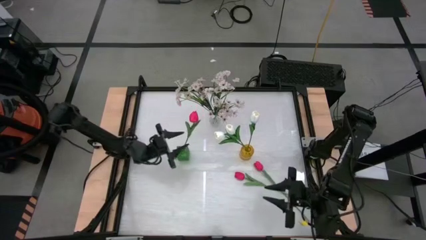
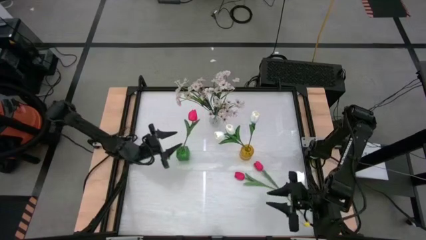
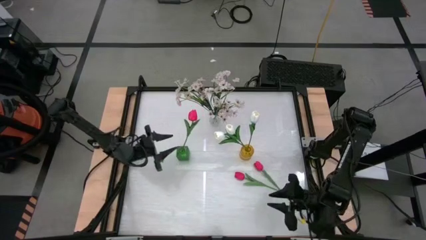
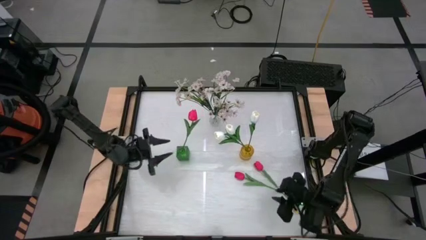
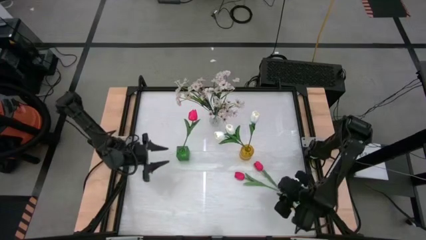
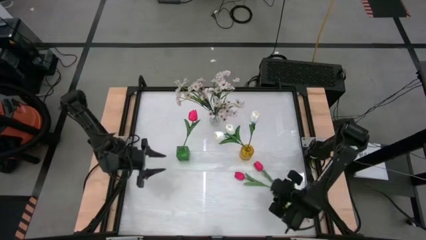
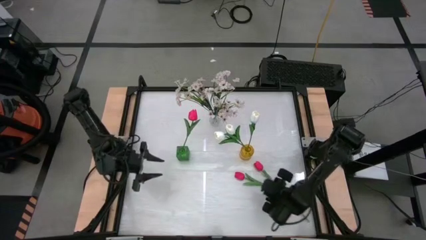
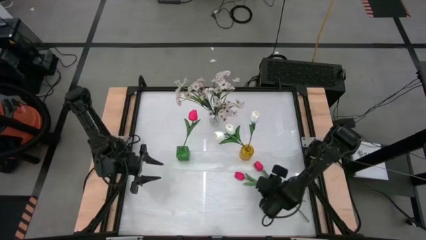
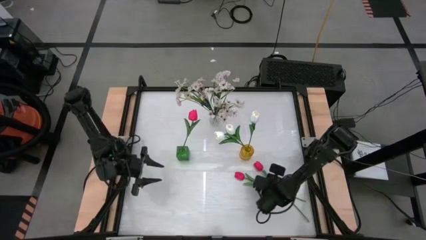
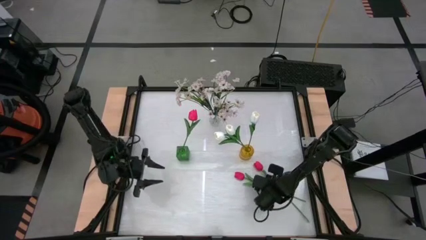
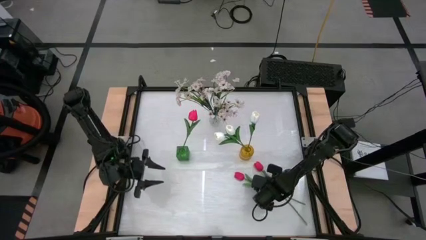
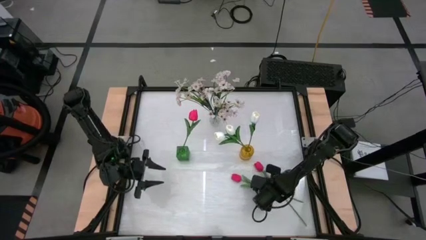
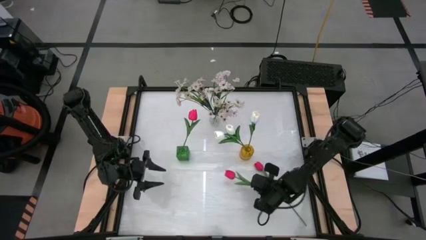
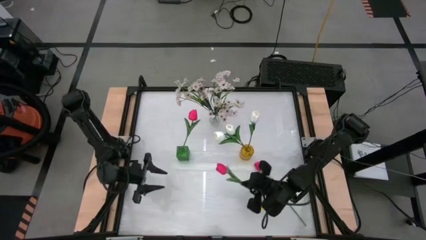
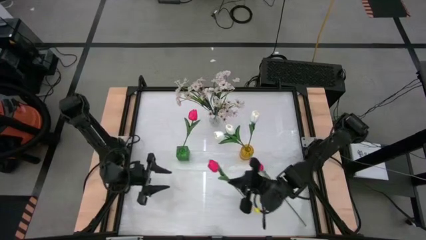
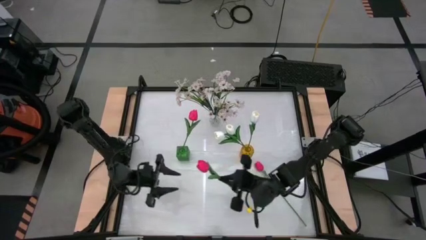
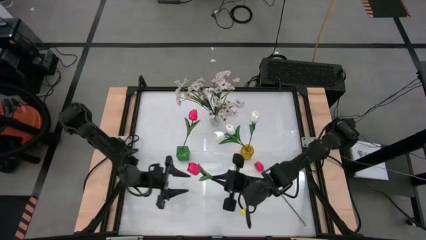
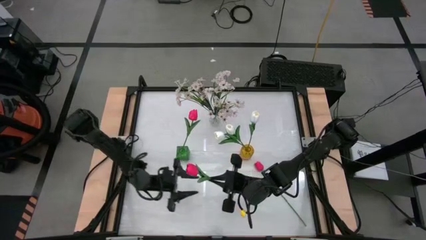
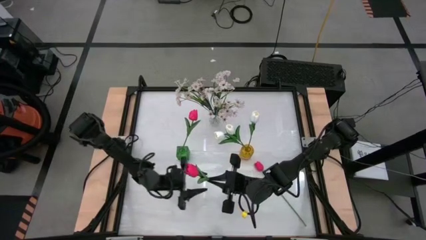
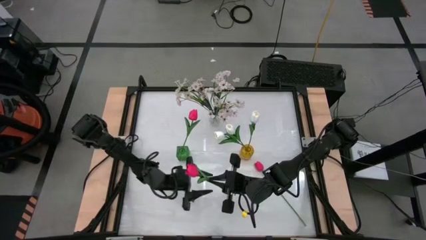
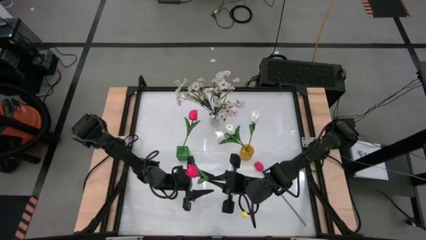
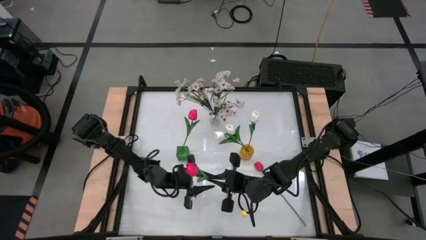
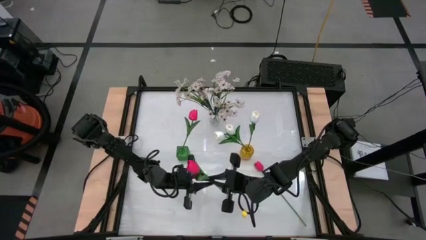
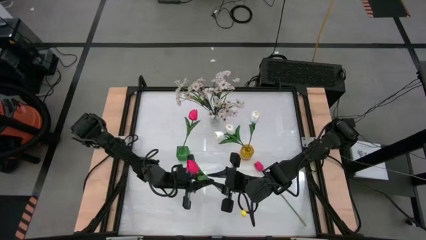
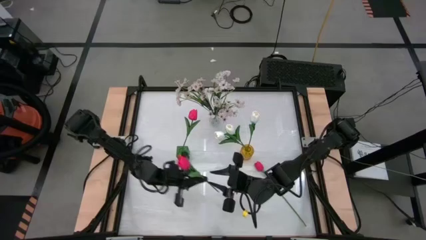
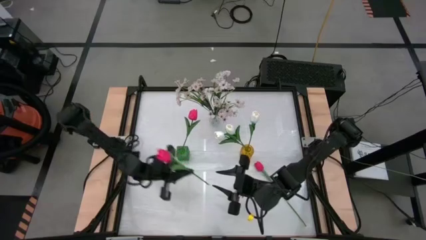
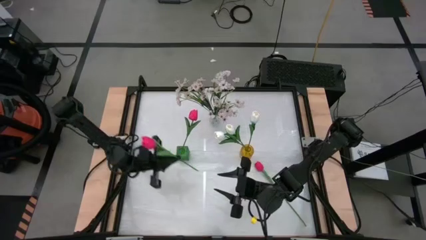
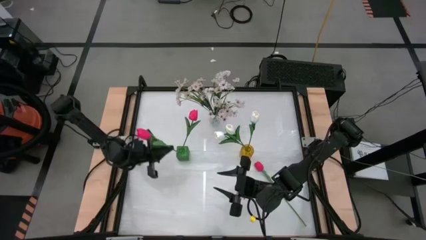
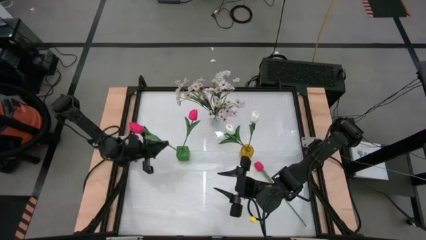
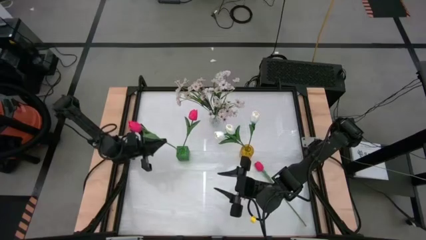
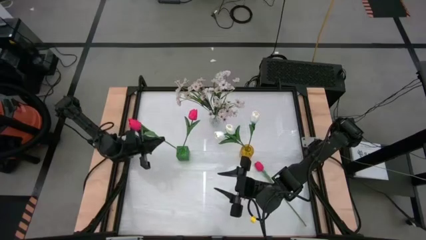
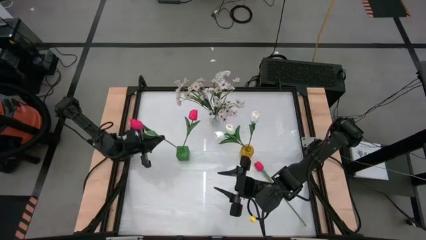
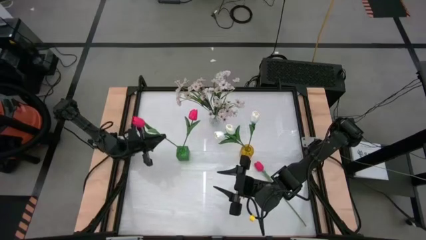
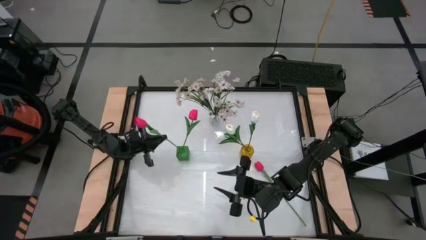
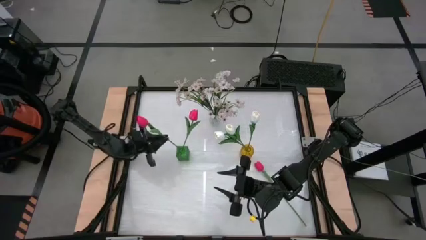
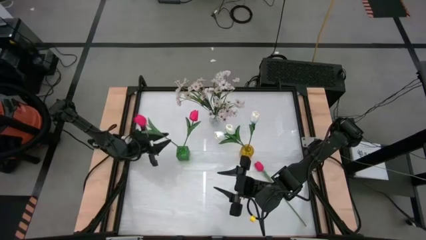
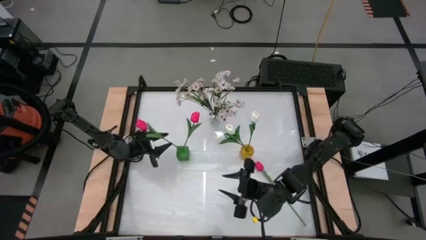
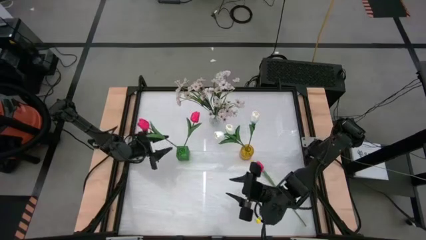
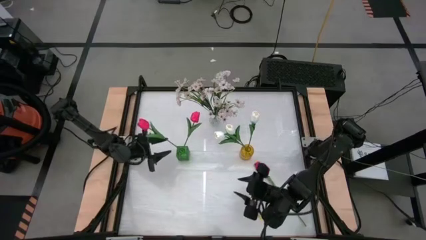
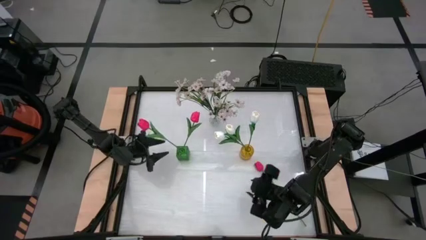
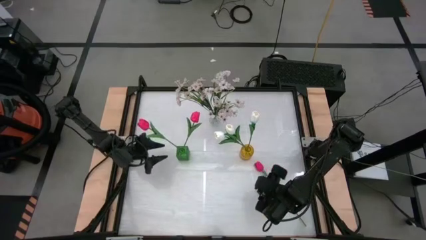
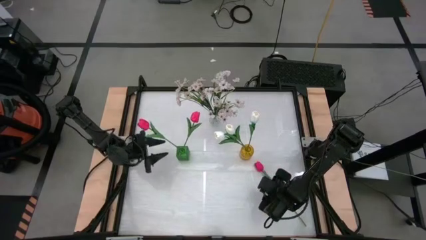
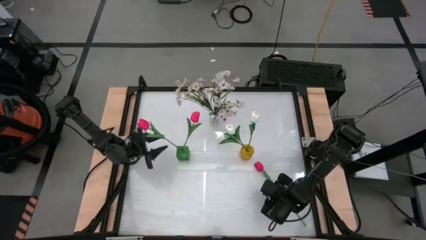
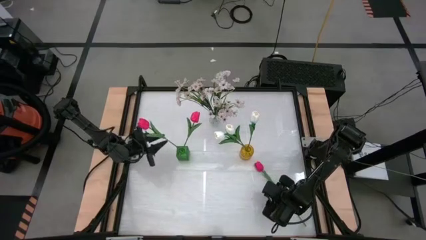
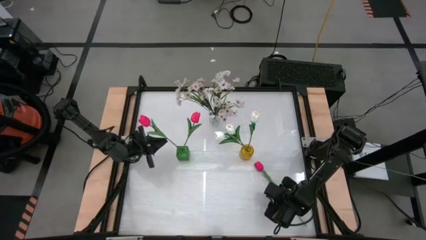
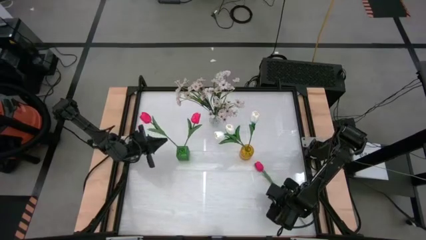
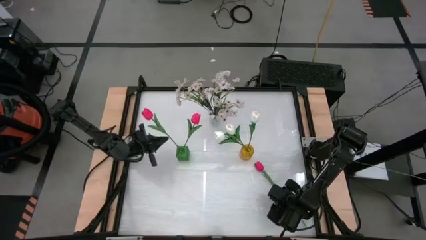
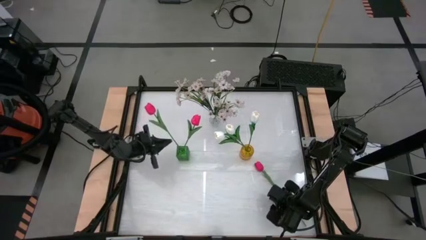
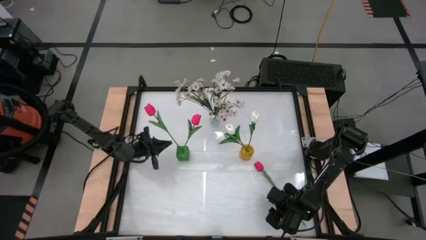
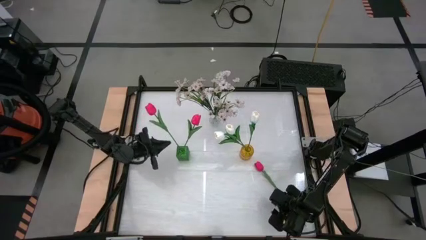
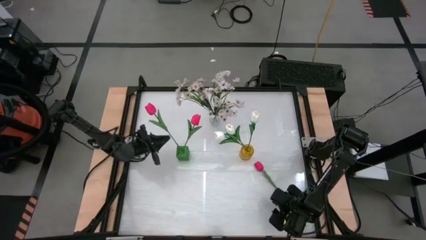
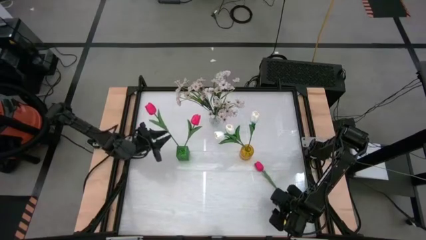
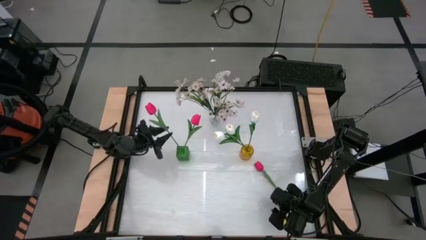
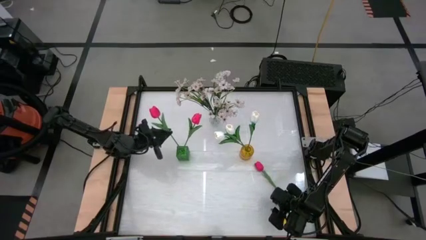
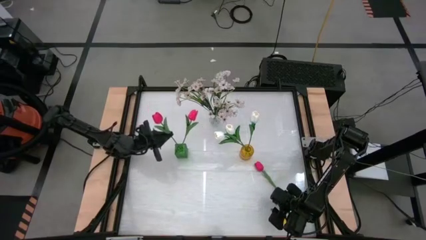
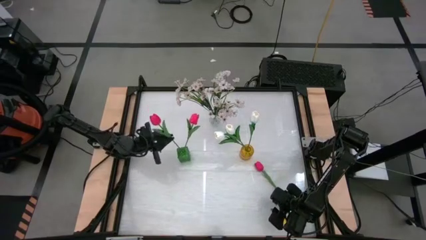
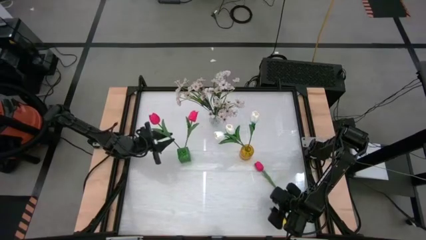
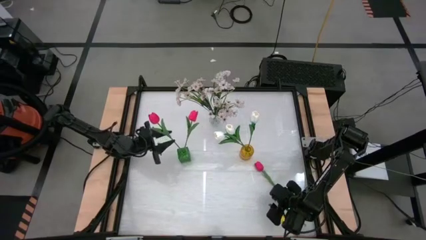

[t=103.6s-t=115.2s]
Task: Sort flowers into vase by color
Put the left red flower into the green vase

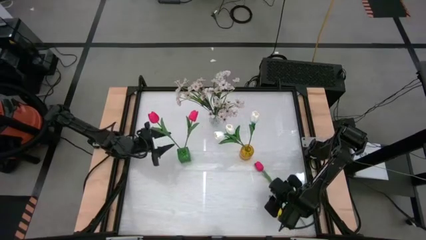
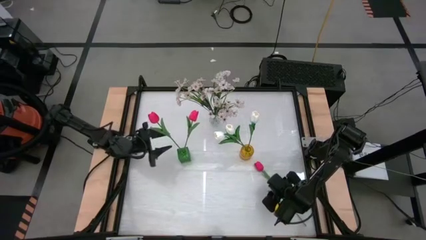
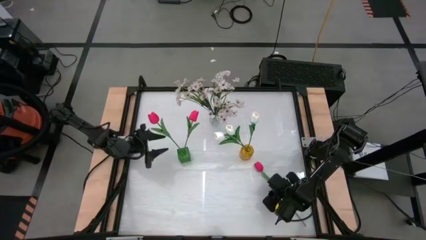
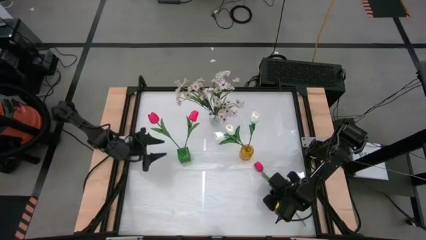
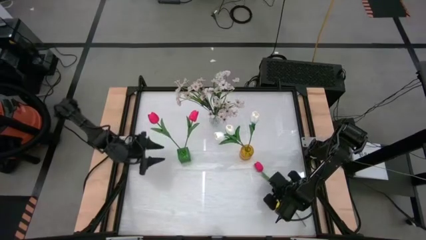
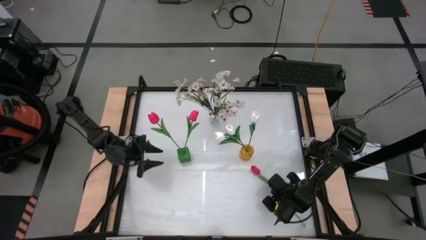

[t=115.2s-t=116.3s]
Put the red flower into the green vase

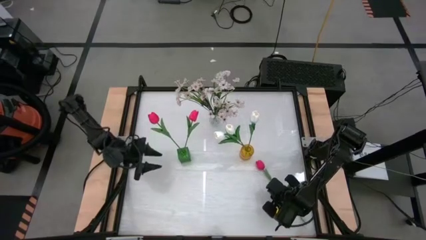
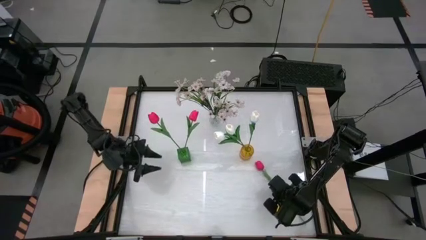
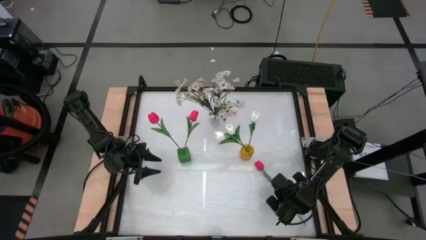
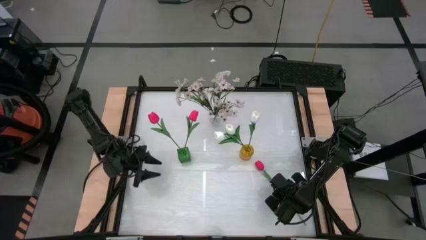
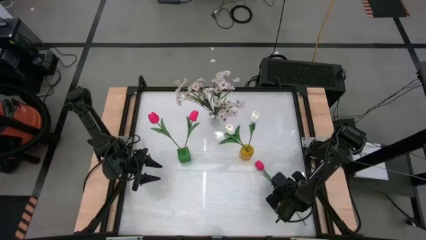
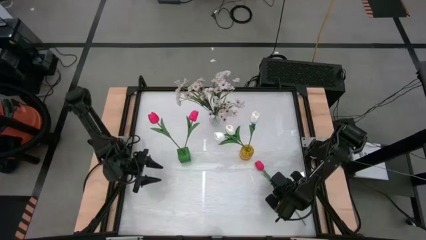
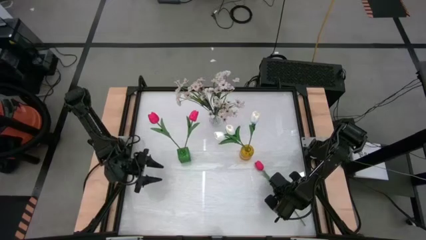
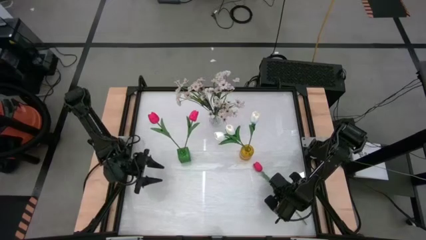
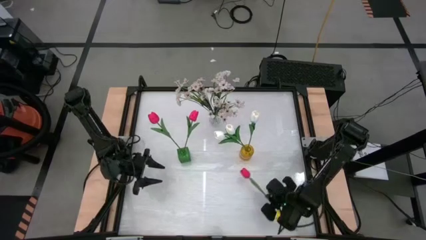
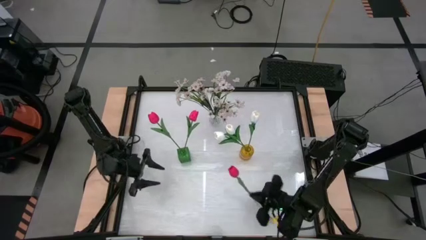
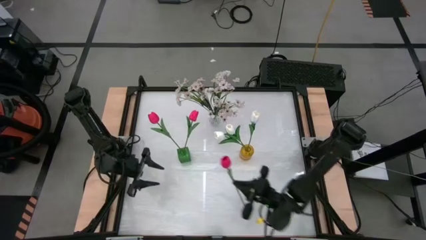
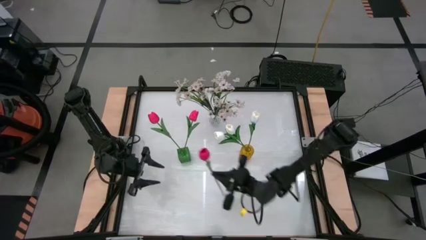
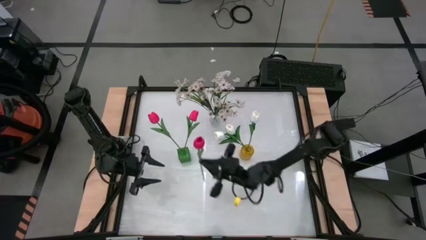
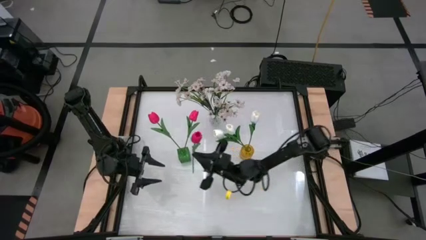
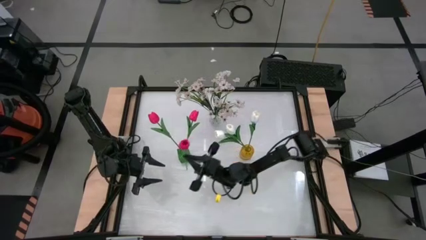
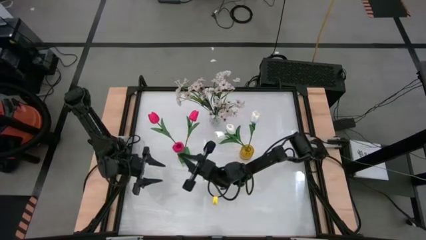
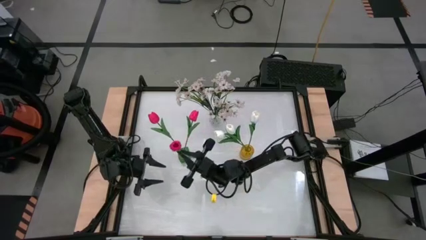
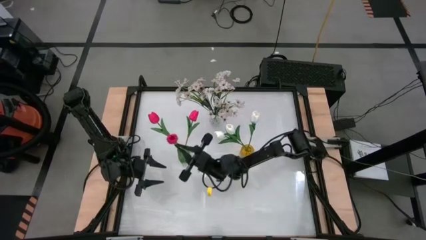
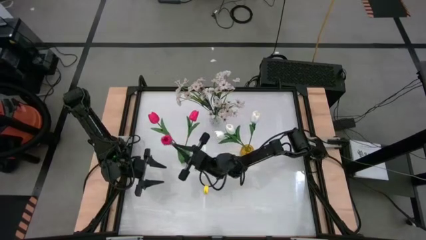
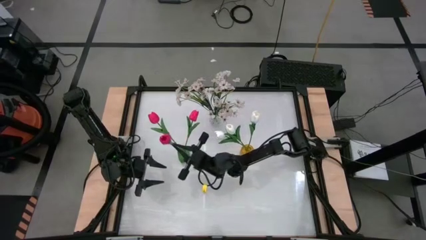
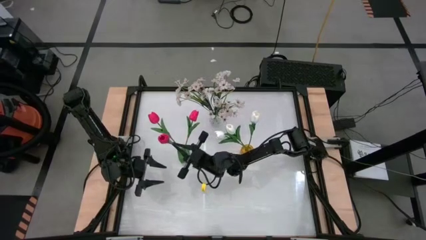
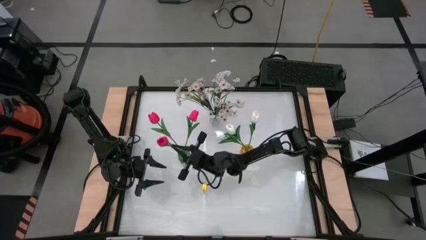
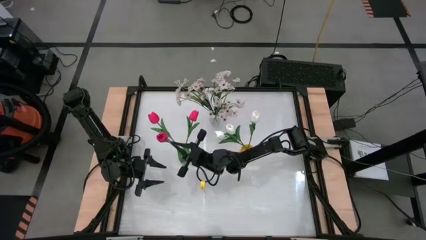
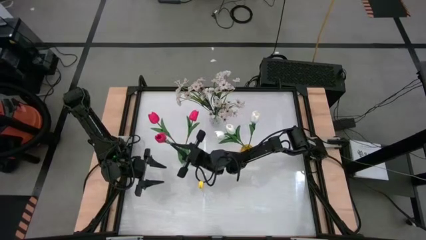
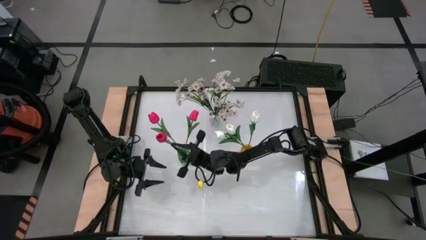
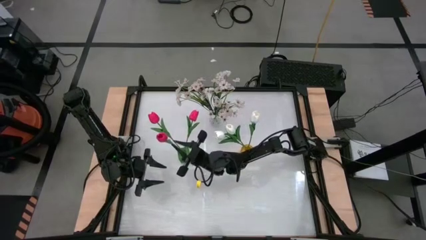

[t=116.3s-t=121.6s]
Put the red flower into the green vase
